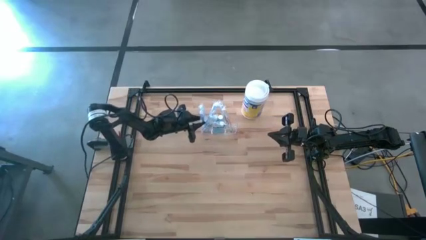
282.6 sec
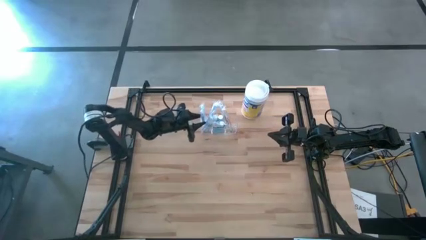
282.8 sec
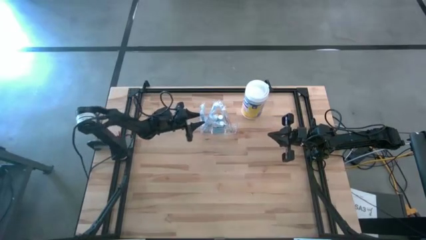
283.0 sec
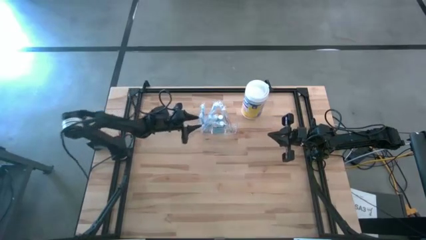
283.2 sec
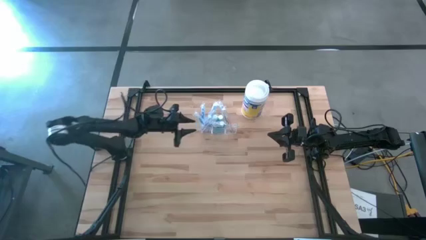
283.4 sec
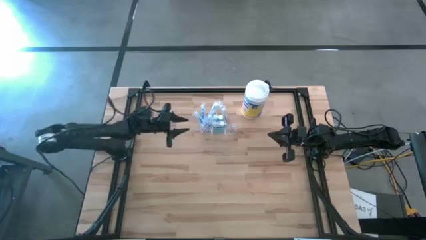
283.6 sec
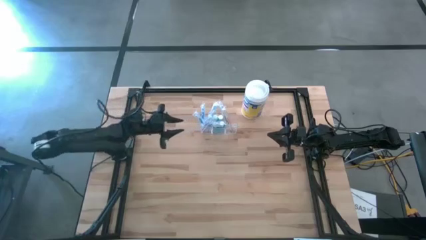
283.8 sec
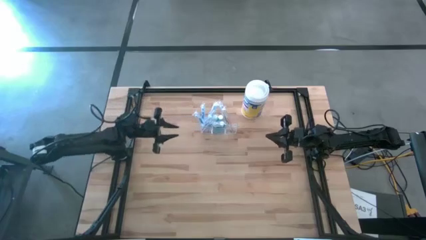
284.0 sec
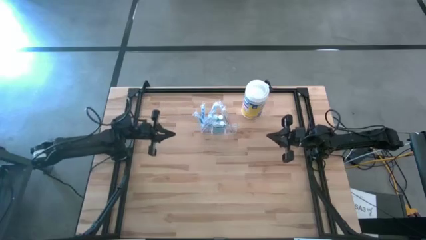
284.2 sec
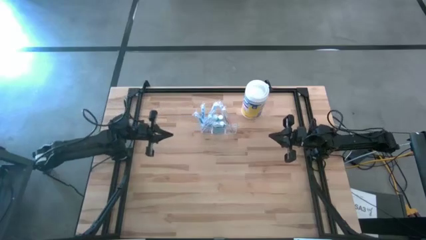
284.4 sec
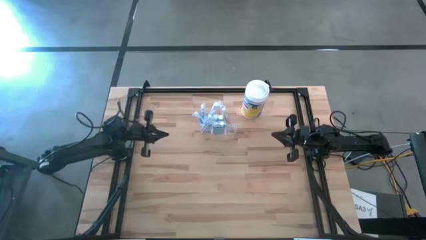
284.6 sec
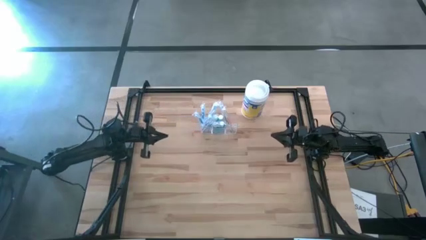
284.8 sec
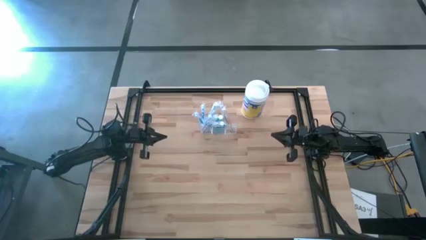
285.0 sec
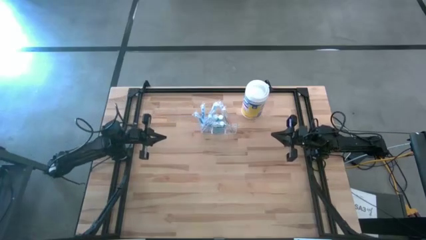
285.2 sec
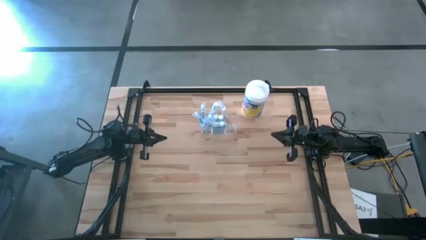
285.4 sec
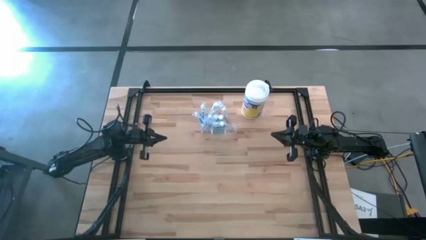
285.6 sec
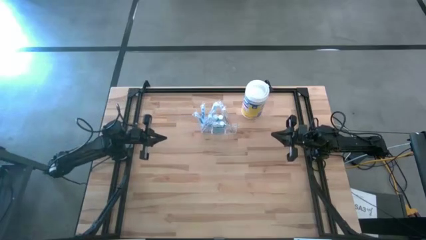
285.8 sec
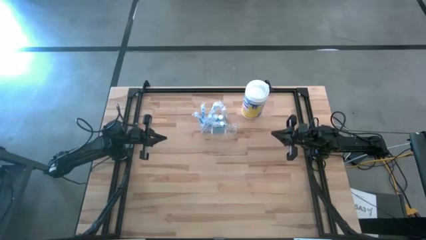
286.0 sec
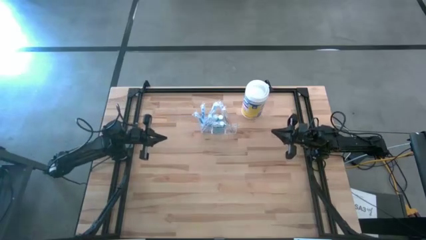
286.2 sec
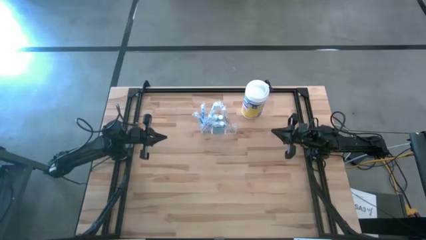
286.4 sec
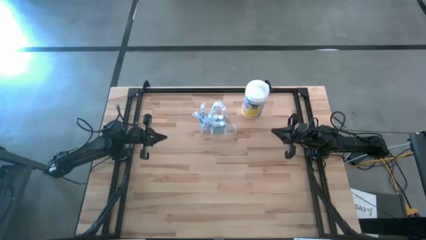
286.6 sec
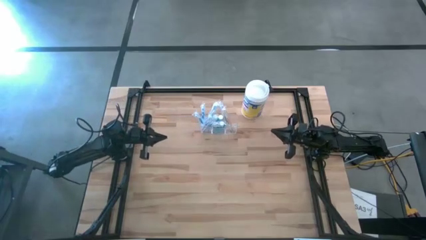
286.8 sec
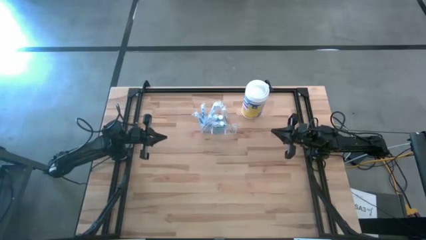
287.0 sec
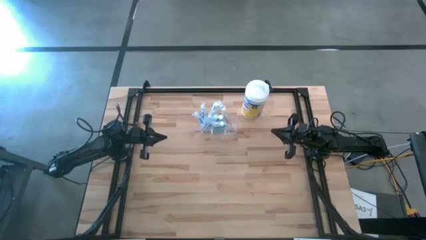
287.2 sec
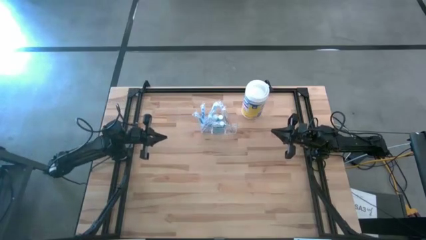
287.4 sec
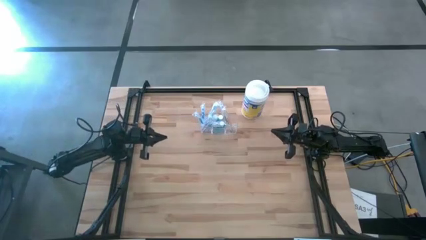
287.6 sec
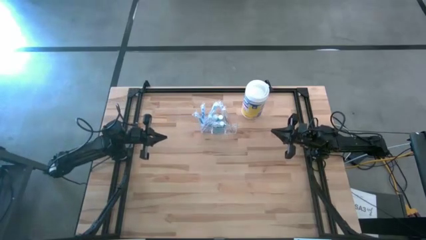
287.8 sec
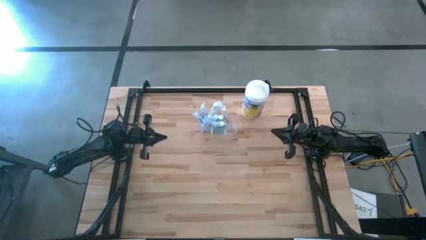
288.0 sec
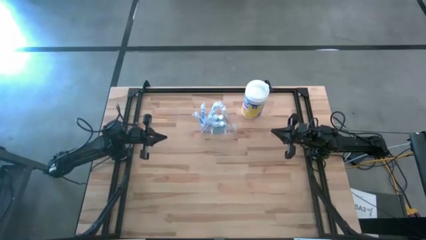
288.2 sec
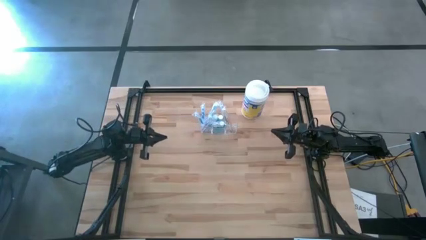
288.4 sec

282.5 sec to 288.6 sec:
Task: Pick & Place toothbrushing station
Return to Home Position

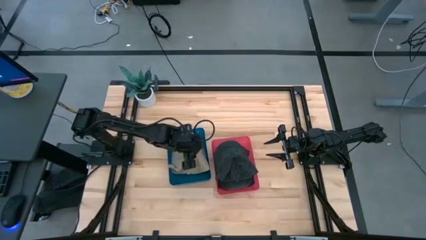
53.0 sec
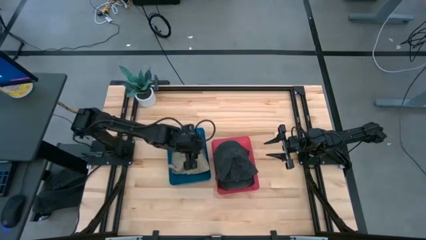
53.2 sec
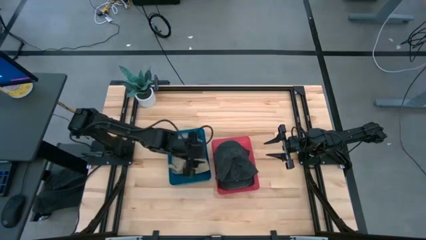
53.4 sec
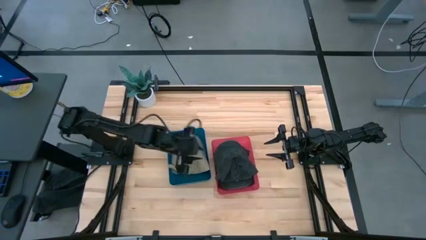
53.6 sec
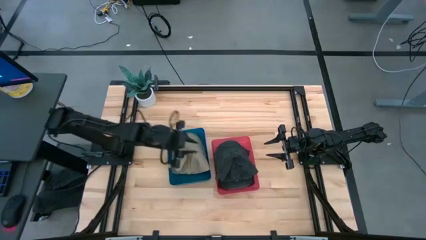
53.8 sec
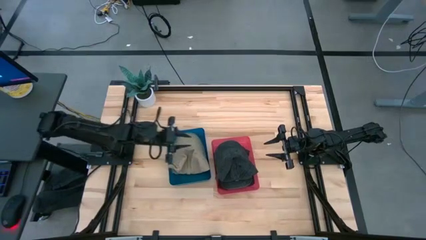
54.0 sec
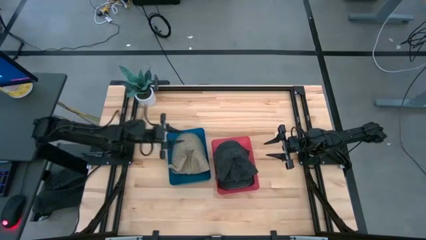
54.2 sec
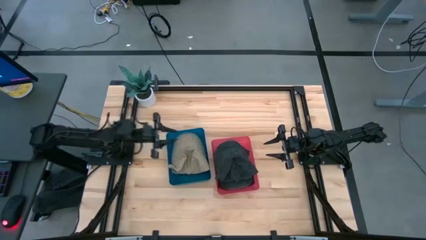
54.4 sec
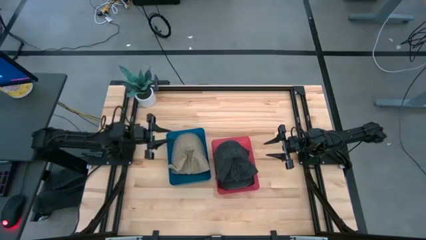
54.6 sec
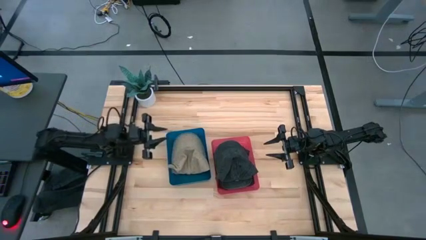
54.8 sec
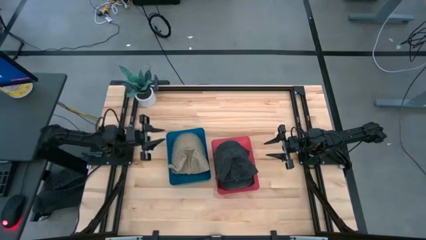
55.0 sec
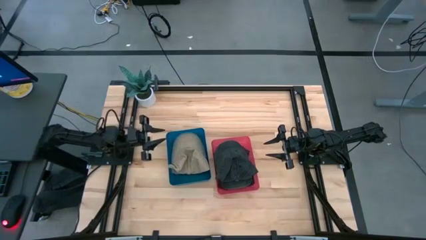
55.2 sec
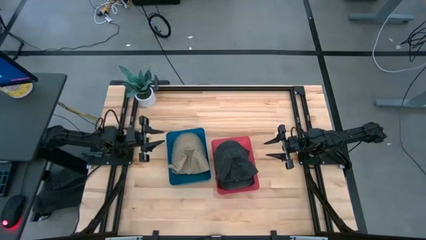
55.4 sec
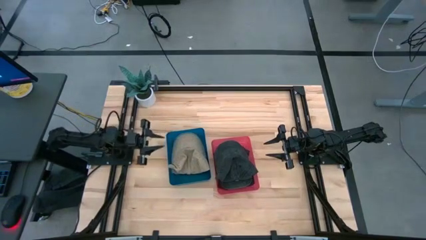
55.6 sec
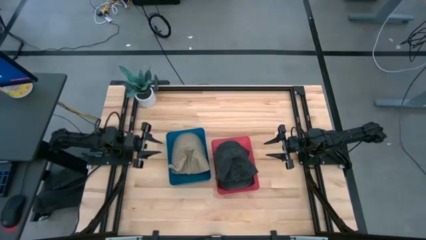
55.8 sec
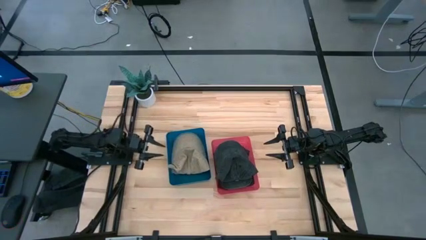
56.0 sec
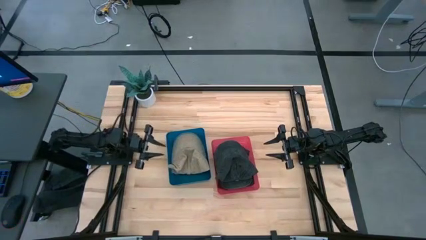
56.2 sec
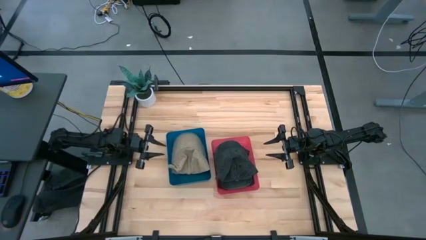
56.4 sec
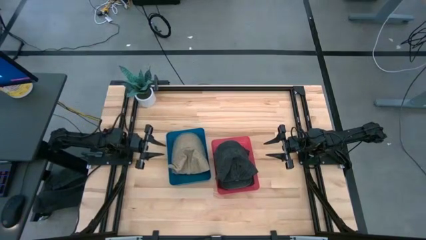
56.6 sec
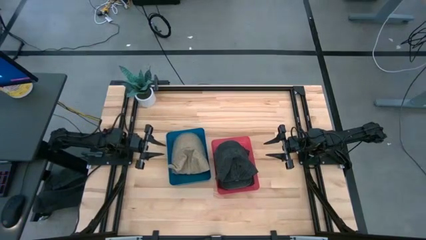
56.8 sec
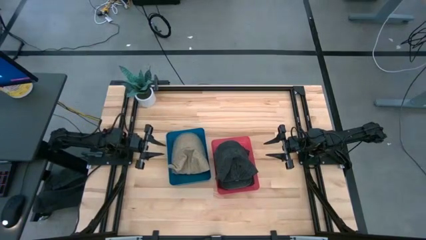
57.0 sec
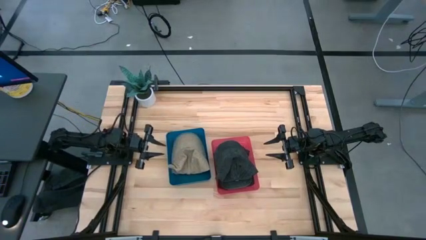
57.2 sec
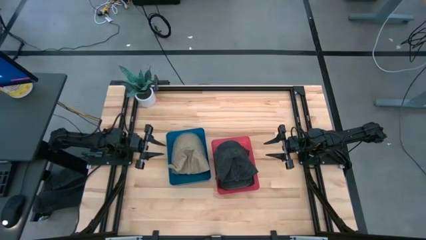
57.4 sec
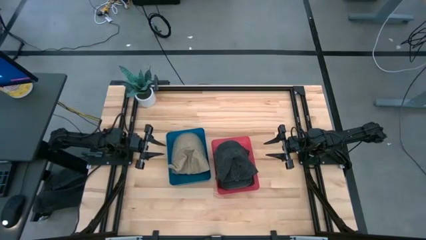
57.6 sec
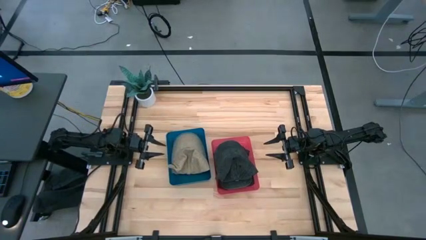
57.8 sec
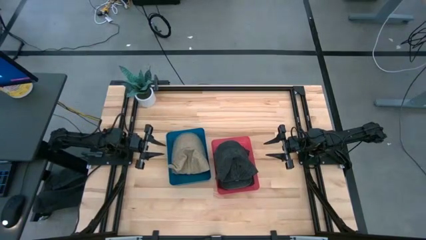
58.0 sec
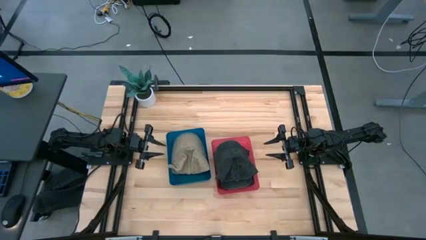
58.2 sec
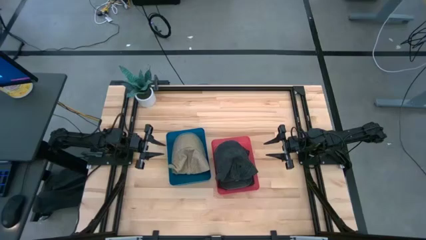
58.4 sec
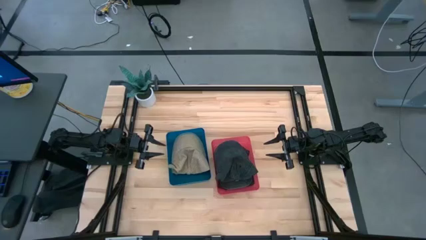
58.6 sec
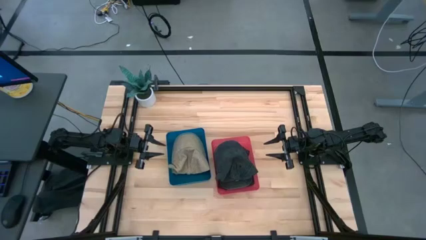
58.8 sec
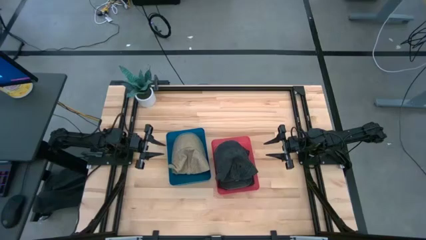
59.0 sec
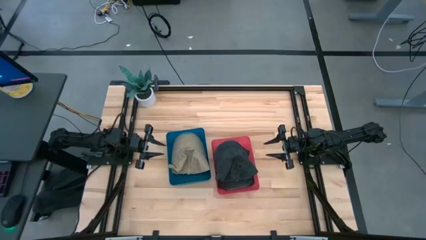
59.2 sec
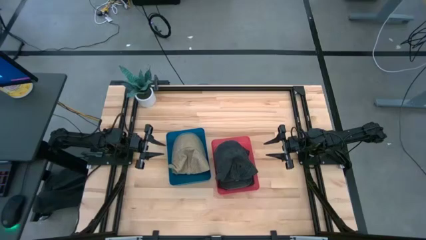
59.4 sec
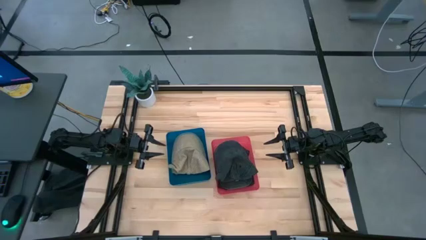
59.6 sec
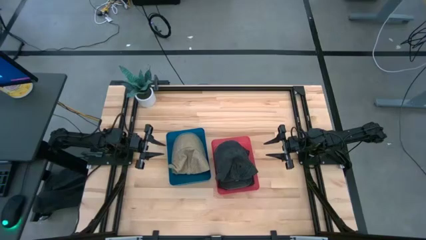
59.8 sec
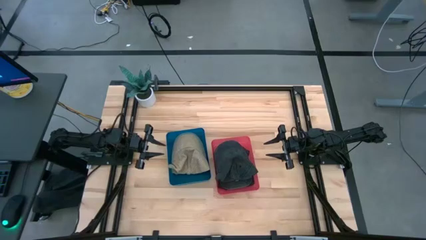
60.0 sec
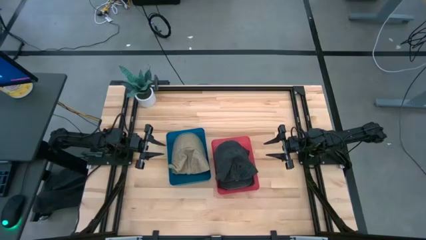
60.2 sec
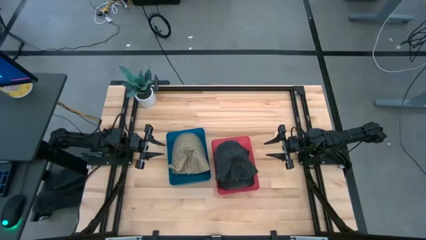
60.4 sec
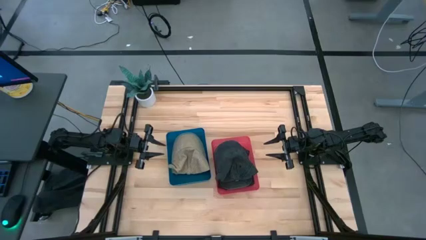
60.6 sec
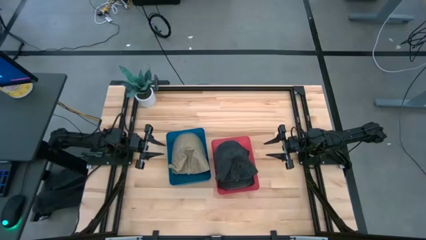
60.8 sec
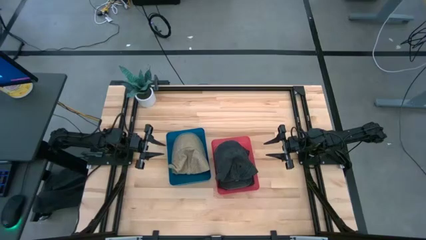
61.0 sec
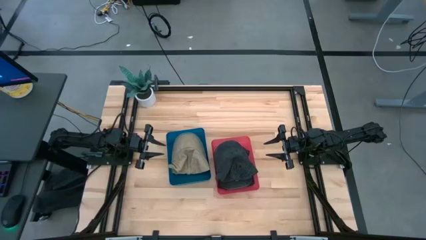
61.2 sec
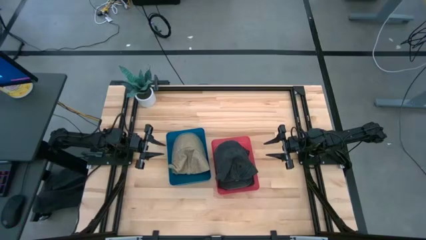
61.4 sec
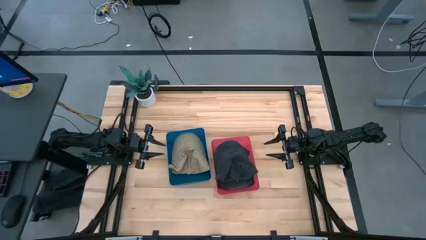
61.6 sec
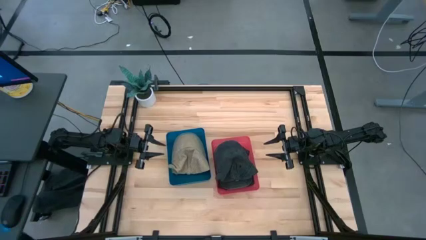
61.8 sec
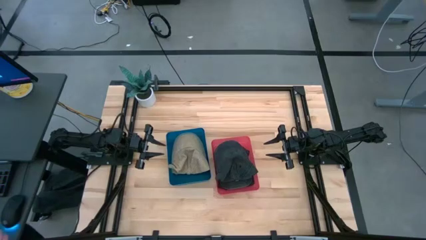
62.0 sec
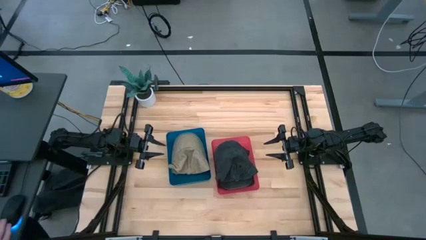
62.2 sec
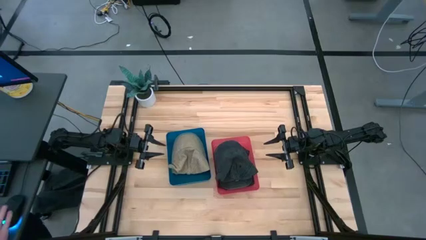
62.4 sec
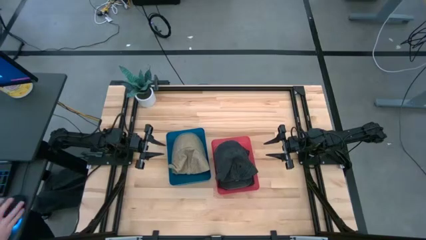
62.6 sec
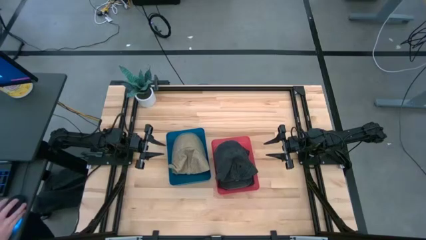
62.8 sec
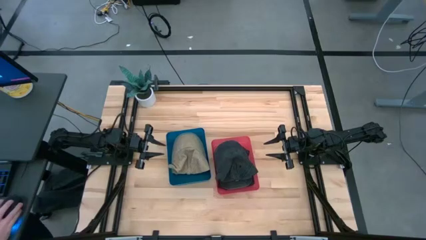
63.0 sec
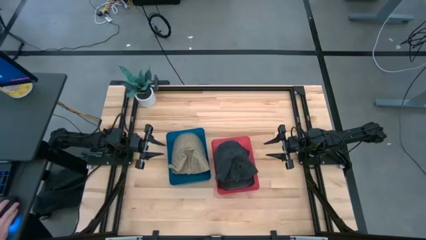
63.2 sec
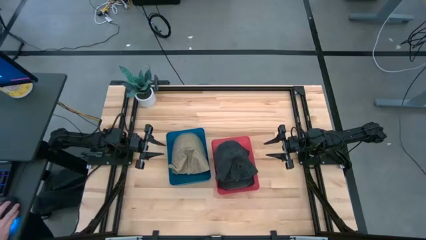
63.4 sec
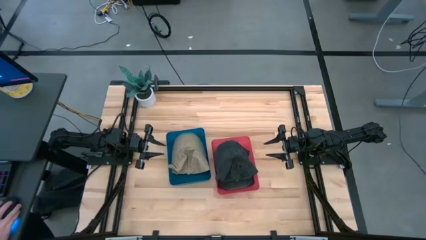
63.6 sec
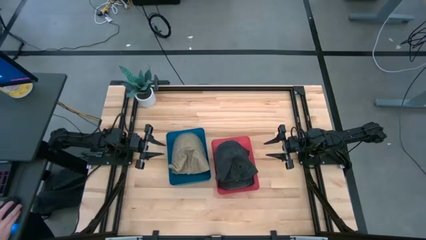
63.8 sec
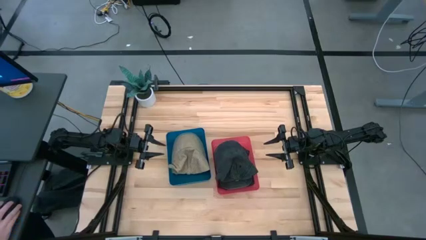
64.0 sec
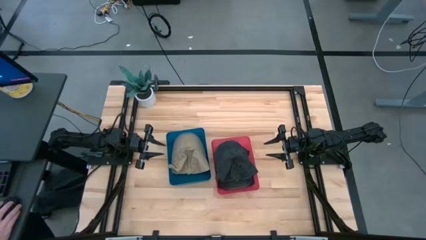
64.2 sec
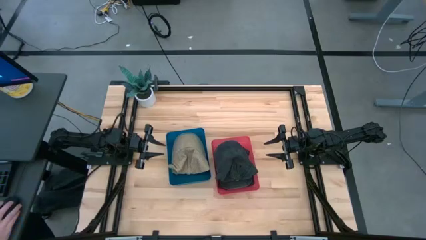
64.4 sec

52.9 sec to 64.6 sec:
Task: Pick & Place hat
Return to Home Position
